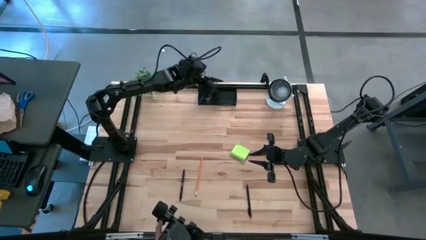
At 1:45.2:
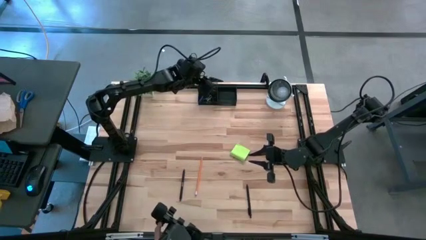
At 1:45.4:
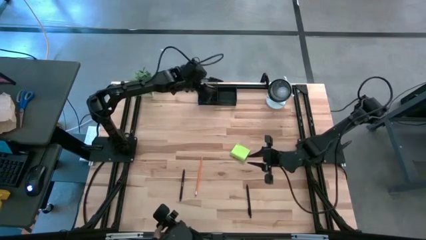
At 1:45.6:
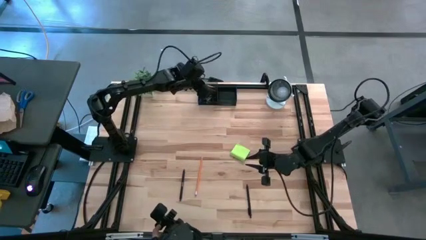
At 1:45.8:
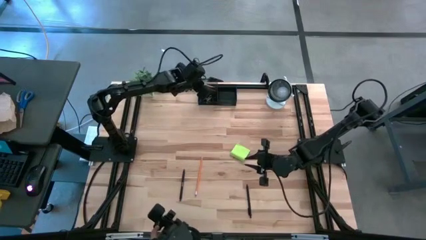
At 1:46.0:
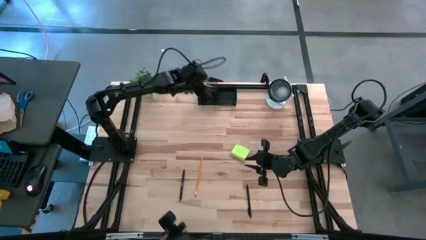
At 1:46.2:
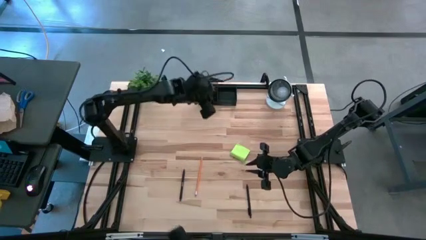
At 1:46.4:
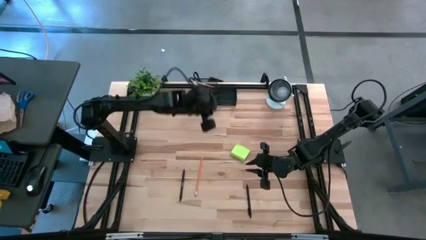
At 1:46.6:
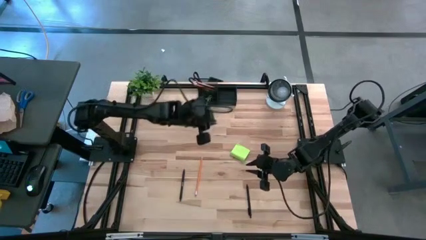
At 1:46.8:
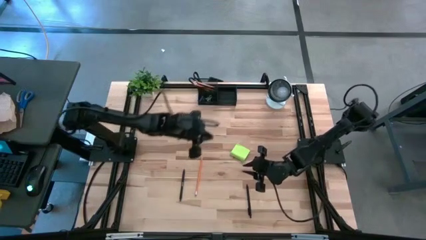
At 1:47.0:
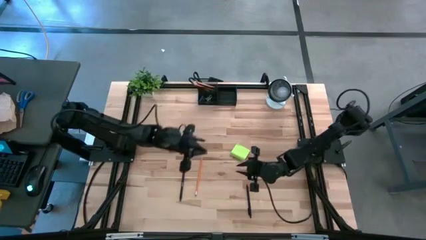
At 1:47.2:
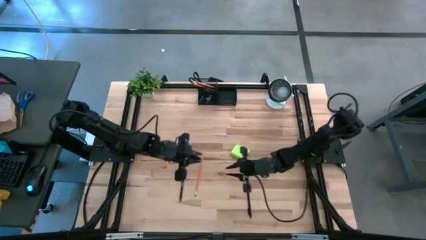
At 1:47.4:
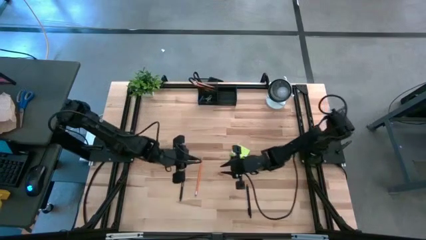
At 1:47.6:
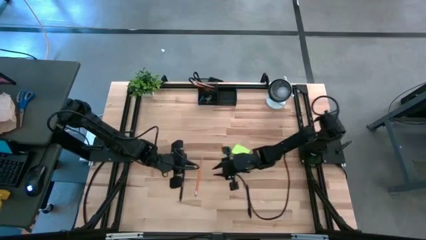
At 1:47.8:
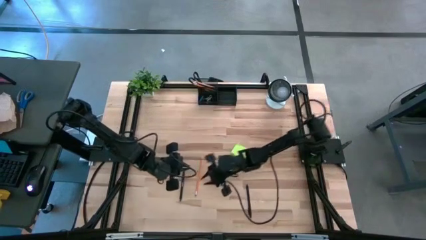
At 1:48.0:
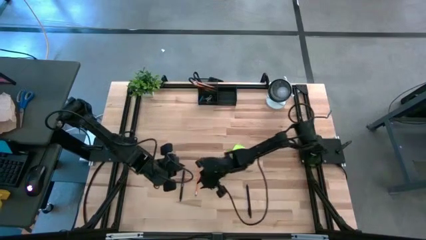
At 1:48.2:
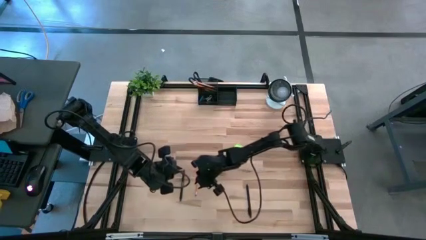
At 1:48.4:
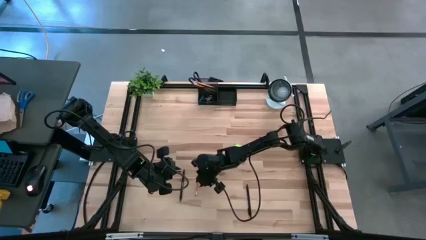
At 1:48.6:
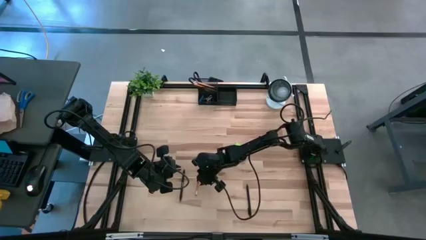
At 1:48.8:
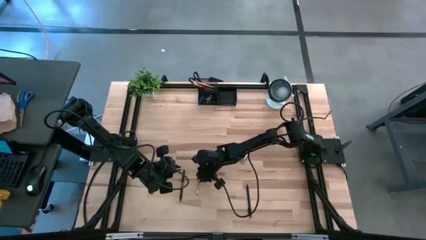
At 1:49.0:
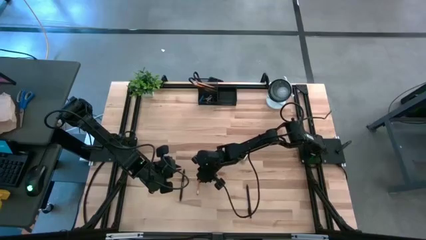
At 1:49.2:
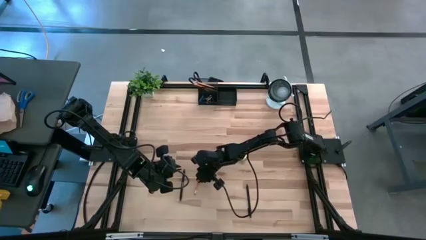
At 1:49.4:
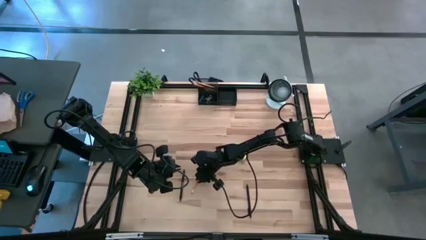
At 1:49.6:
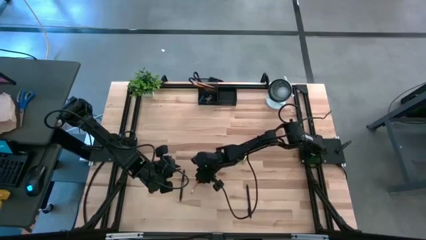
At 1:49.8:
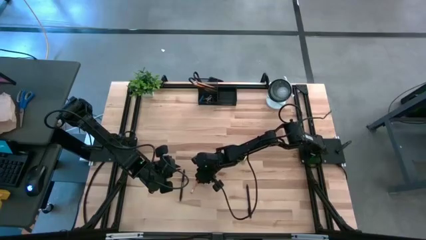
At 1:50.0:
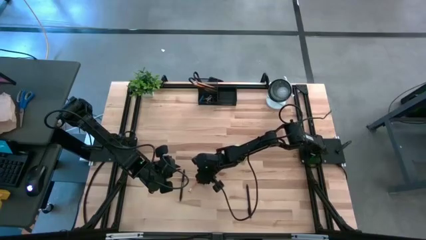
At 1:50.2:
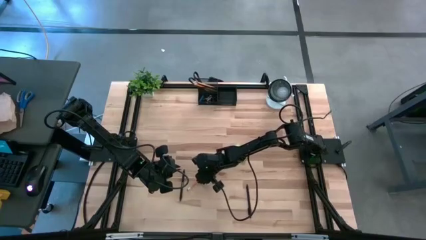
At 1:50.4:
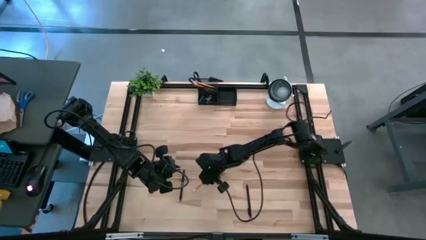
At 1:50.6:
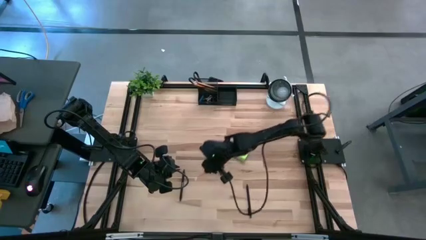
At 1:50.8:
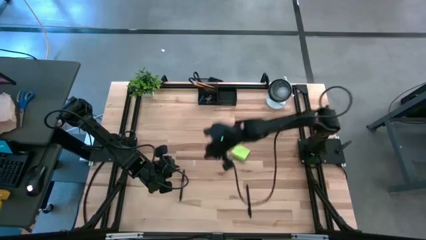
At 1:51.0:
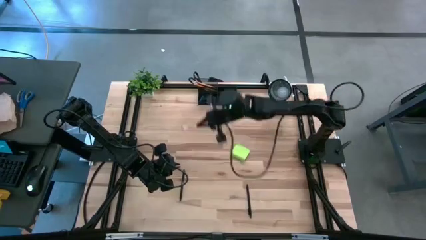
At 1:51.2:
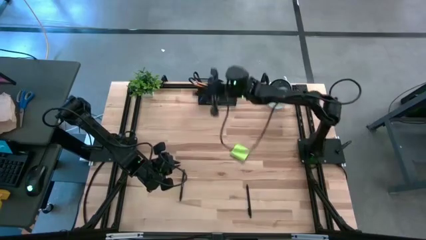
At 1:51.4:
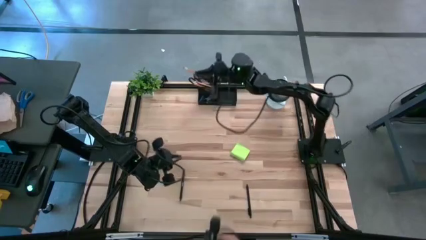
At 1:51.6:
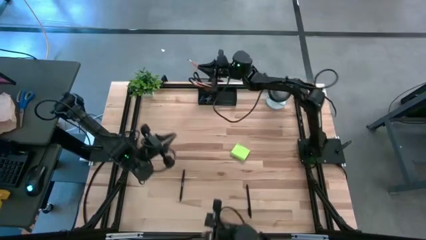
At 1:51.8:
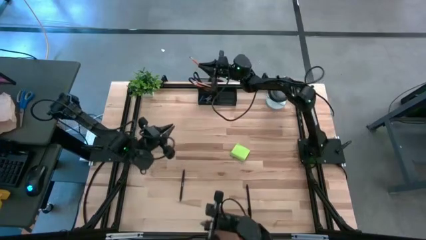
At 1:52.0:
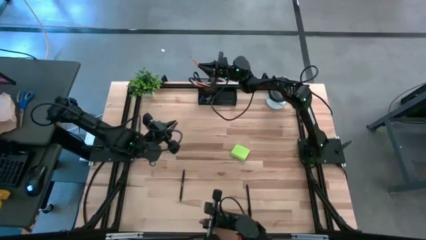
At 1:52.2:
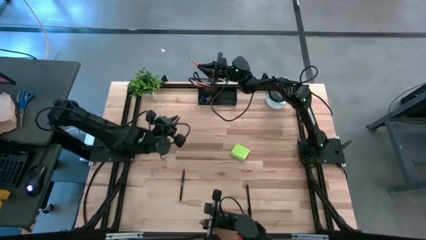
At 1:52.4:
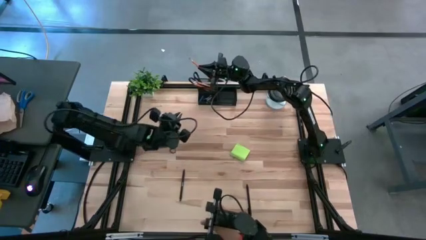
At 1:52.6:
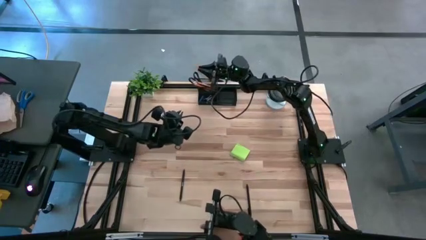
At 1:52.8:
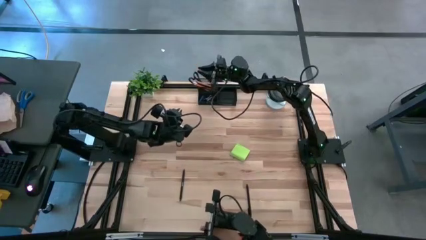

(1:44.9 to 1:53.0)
Task: Pick and place office supplies into organizer
Put the orange pencil into the black desk organizer

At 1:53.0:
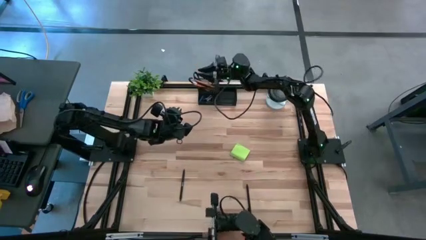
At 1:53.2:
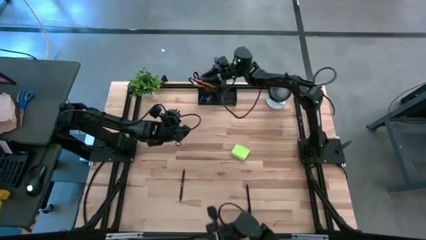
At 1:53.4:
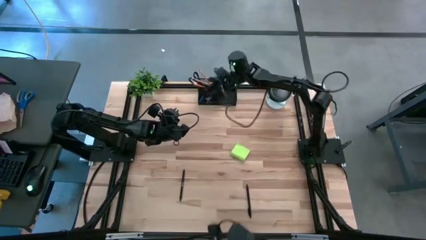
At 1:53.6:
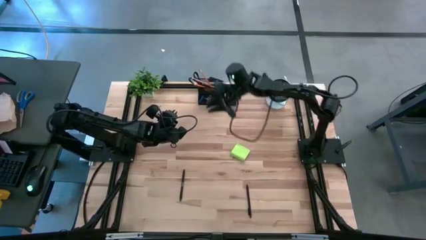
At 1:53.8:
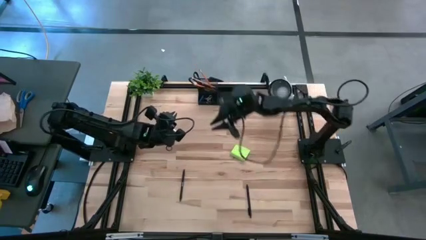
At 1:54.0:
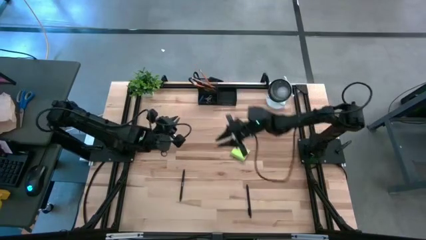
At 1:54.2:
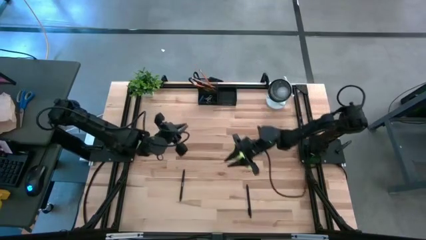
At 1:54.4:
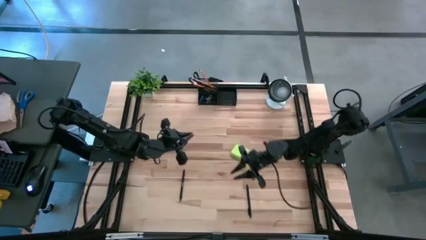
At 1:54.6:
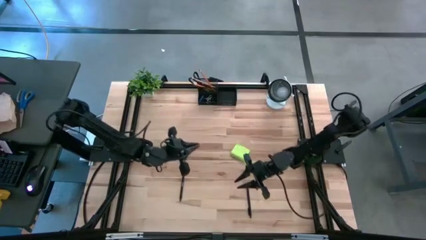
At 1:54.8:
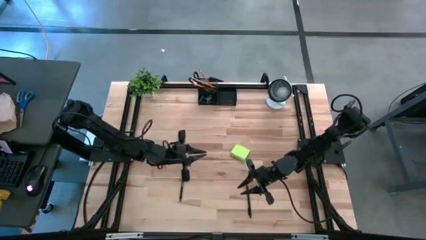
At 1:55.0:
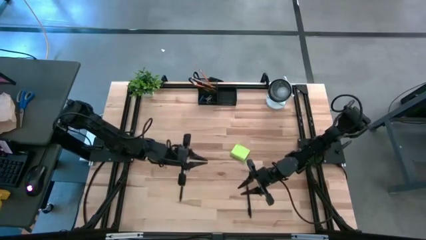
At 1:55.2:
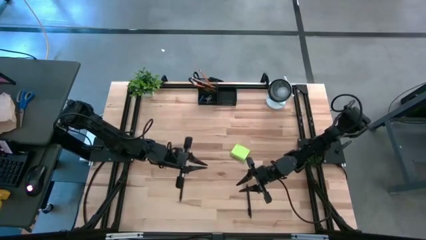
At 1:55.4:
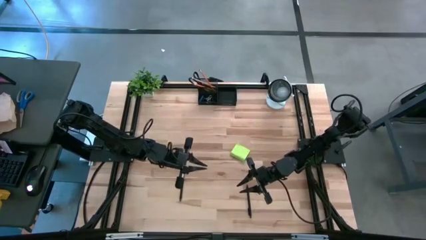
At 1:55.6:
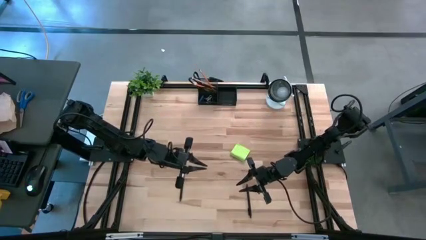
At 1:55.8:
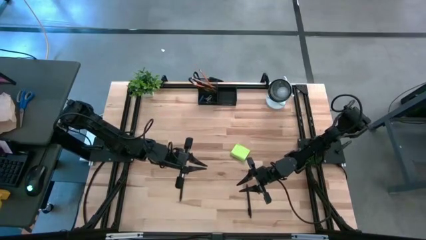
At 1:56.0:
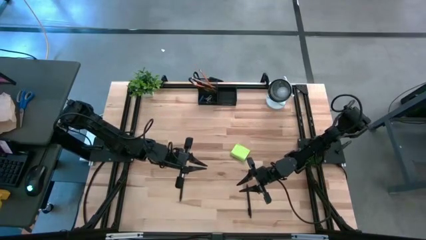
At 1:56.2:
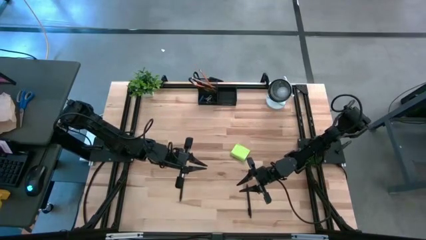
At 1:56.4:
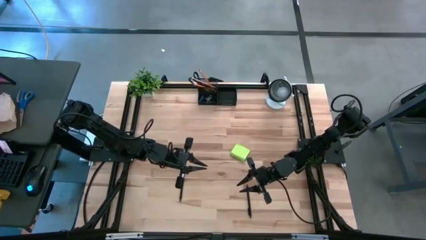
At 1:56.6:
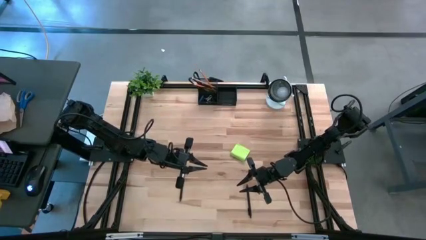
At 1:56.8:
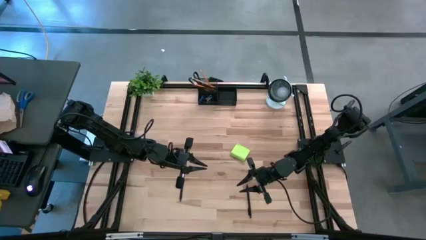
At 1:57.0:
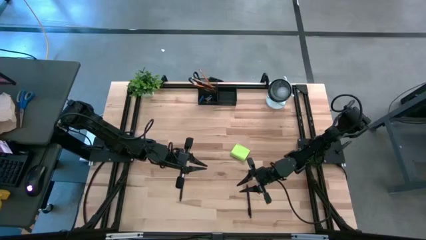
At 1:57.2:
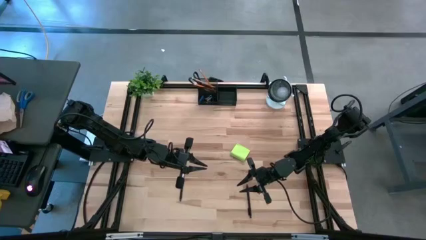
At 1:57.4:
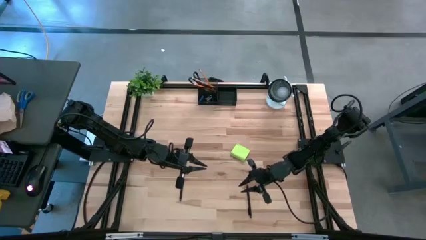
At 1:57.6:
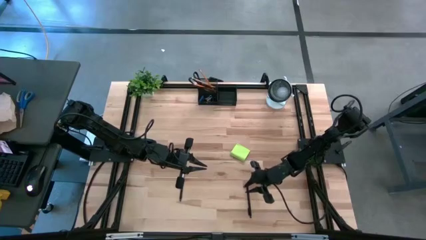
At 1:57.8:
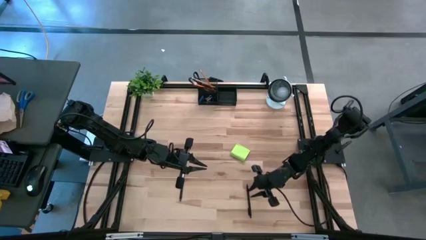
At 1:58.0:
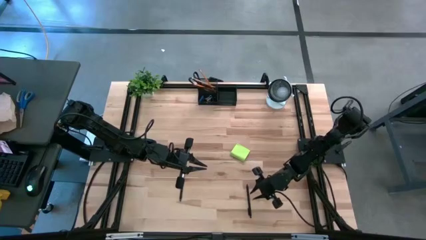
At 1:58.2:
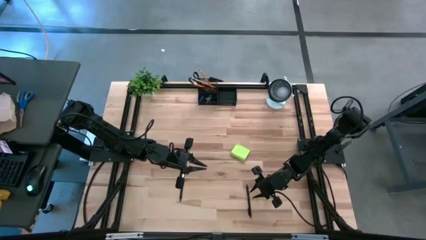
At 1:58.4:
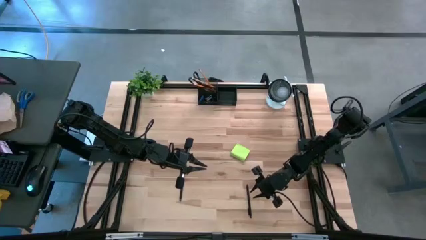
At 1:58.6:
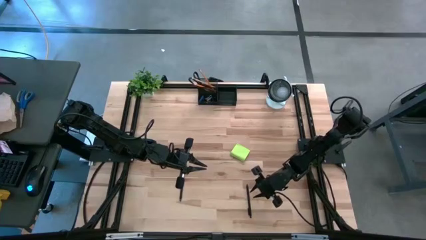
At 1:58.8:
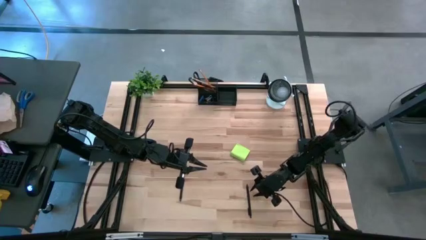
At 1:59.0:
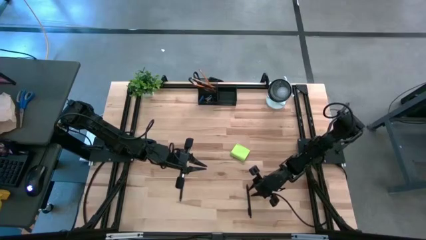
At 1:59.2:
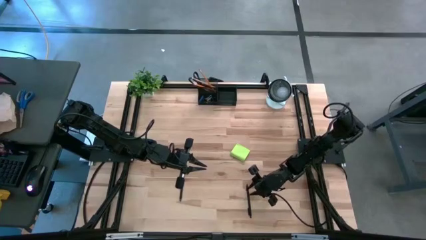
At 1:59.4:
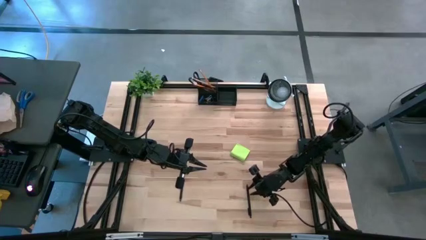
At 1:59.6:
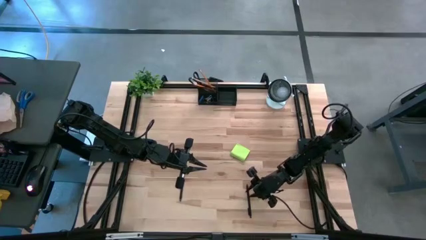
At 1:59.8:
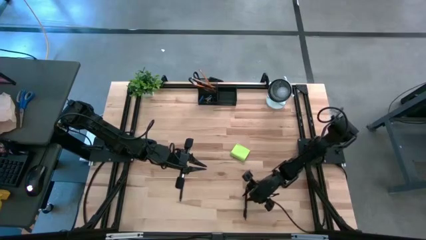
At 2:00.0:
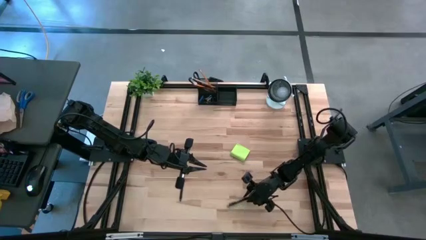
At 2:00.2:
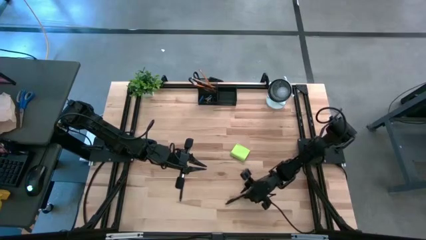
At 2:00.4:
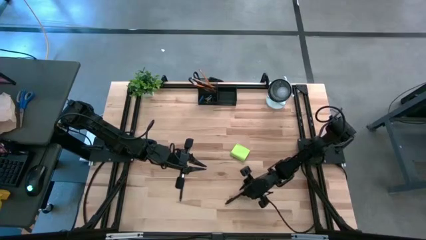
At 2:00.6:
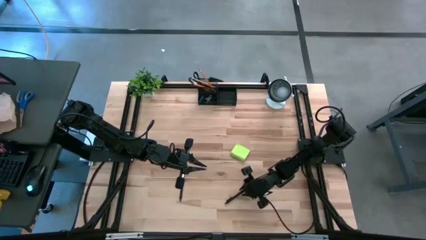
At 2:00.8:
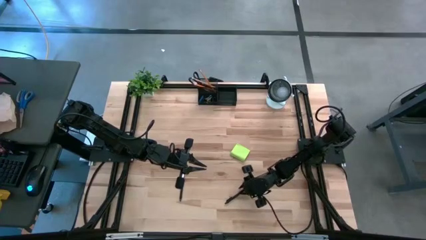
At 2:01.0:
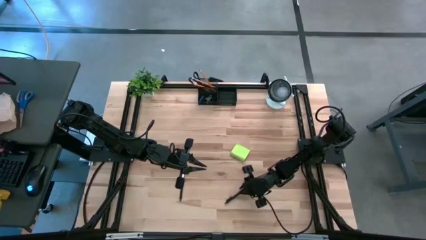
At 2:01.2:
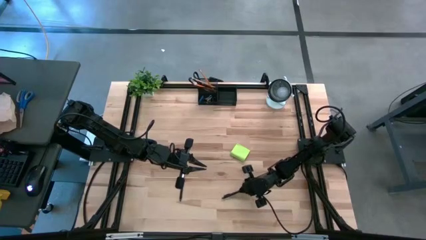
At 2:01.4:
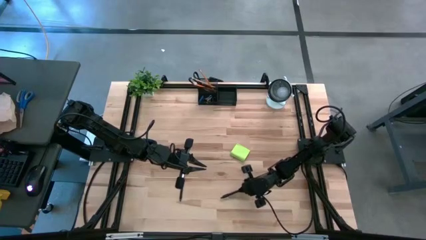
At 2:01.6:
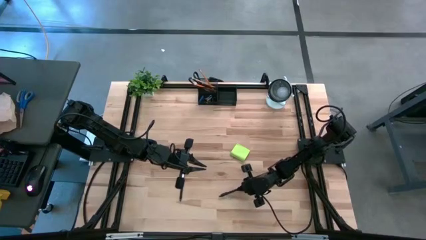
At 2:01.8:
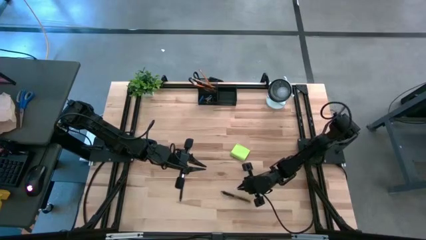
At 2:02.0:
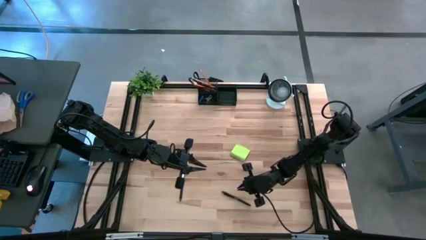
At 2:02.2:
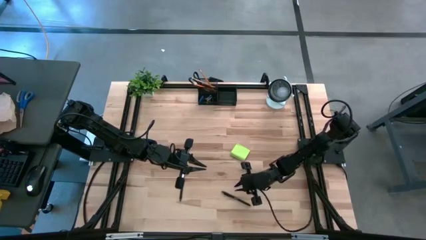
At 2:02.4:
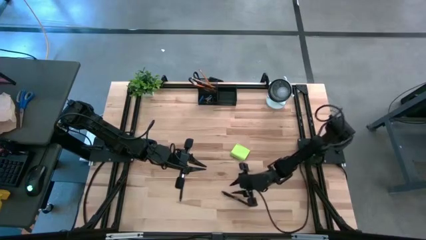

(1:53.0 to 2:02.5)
Put the right black pen into the black desk organizer
